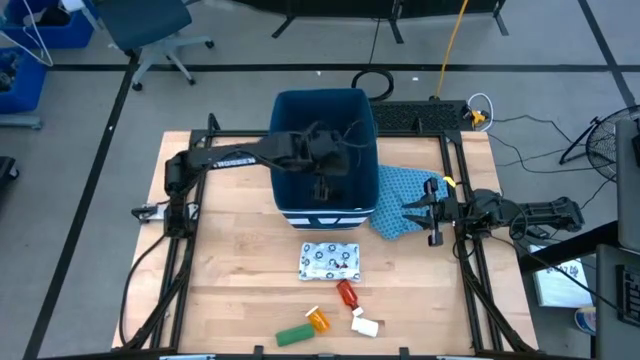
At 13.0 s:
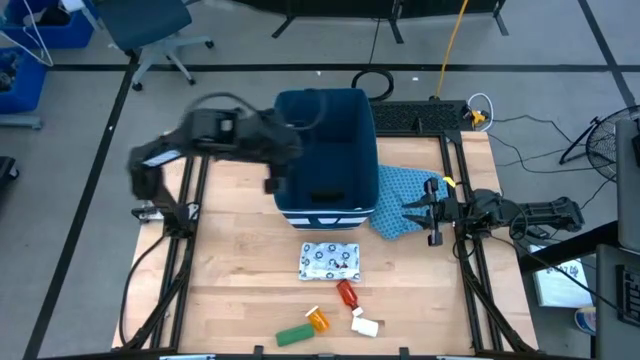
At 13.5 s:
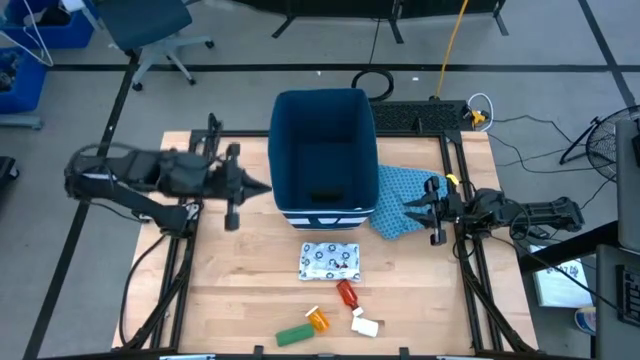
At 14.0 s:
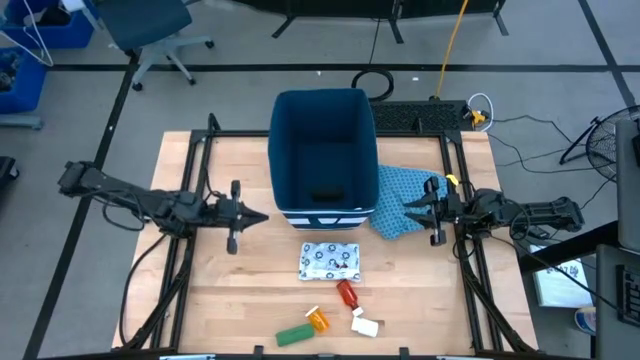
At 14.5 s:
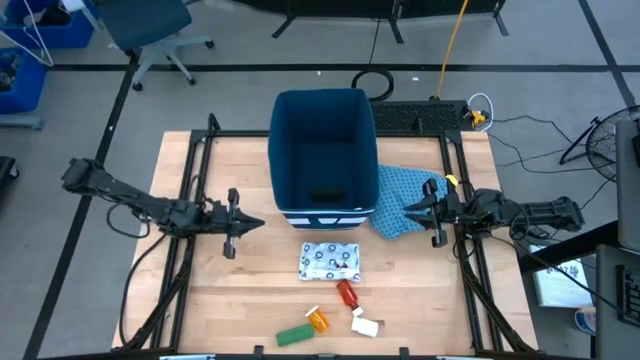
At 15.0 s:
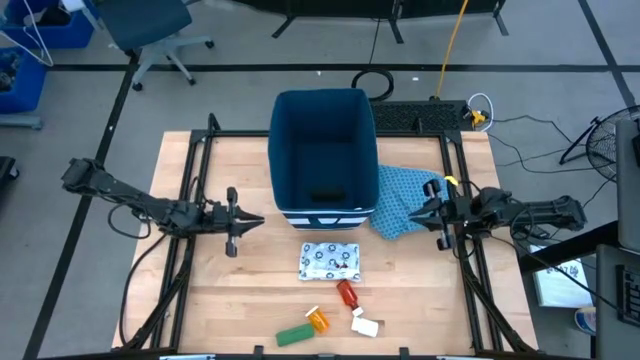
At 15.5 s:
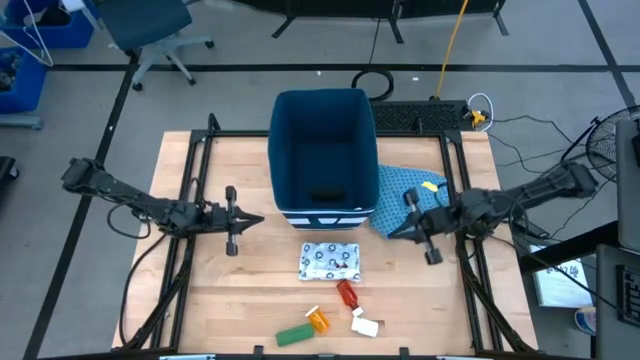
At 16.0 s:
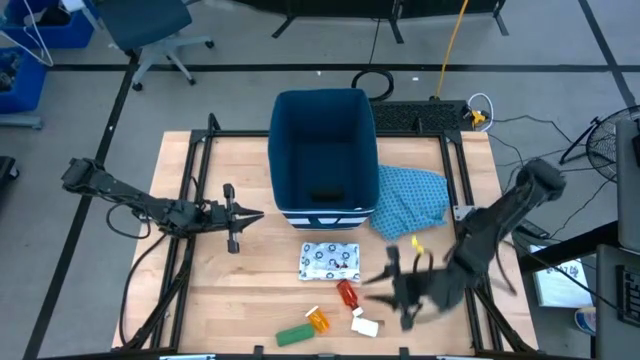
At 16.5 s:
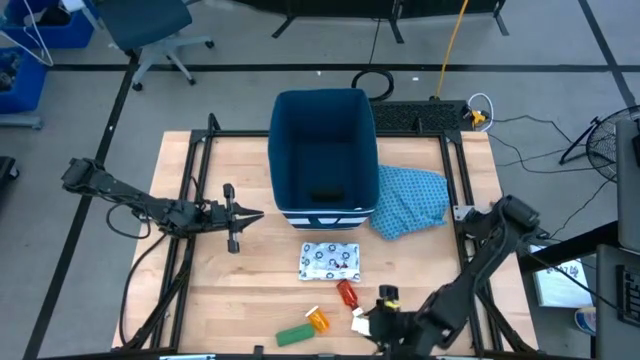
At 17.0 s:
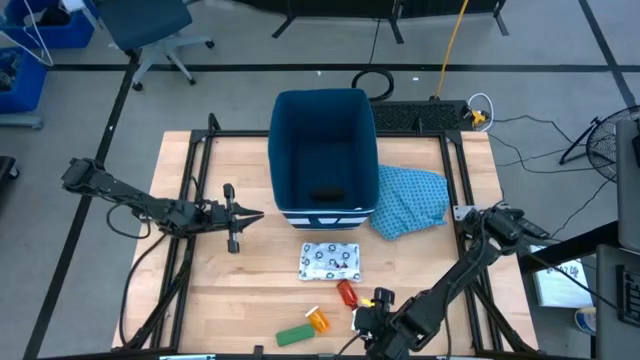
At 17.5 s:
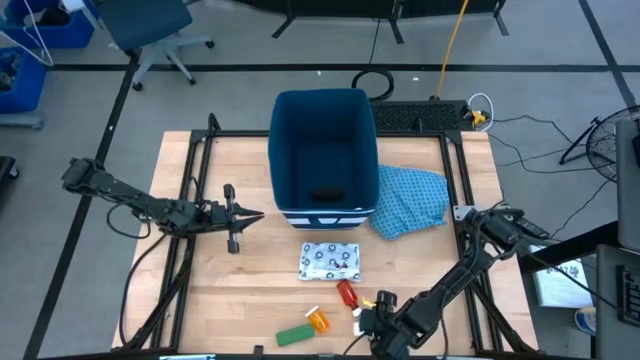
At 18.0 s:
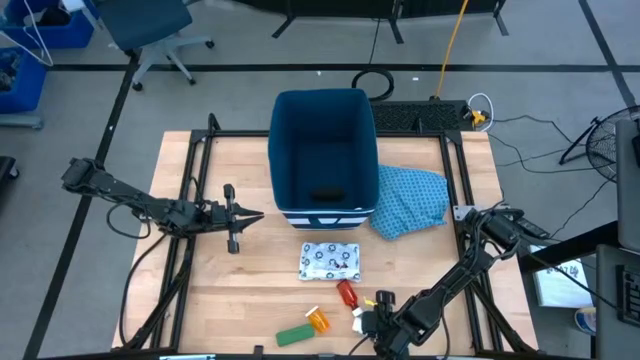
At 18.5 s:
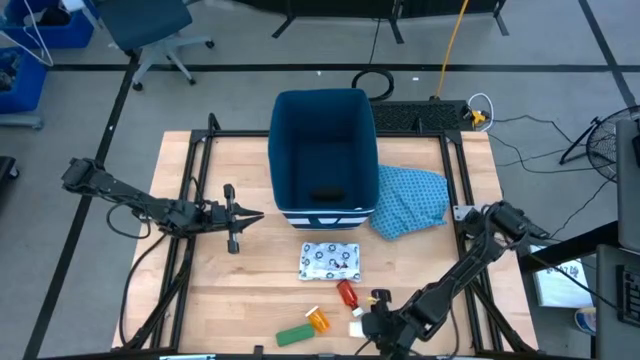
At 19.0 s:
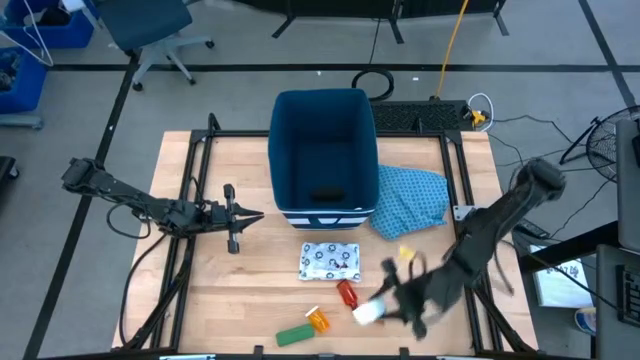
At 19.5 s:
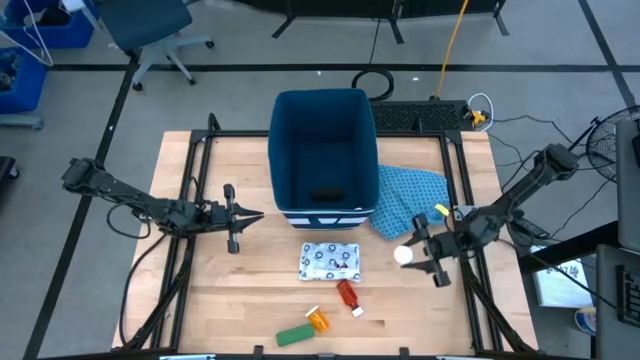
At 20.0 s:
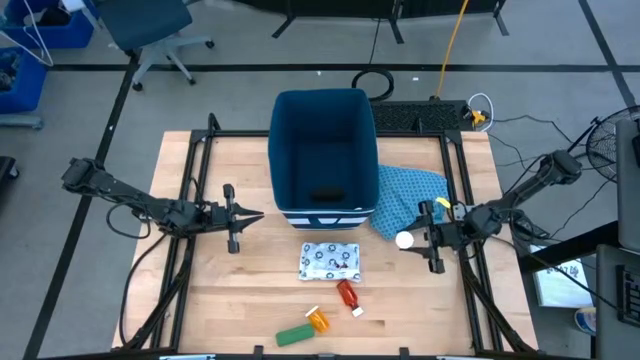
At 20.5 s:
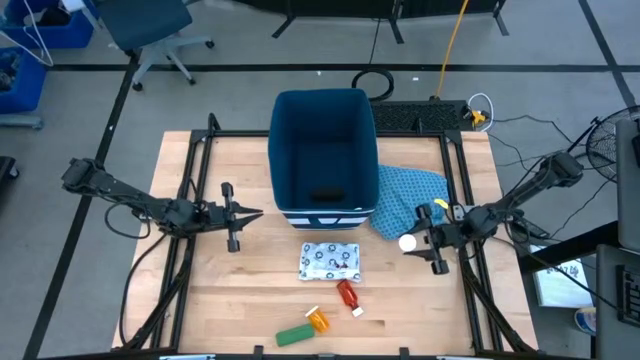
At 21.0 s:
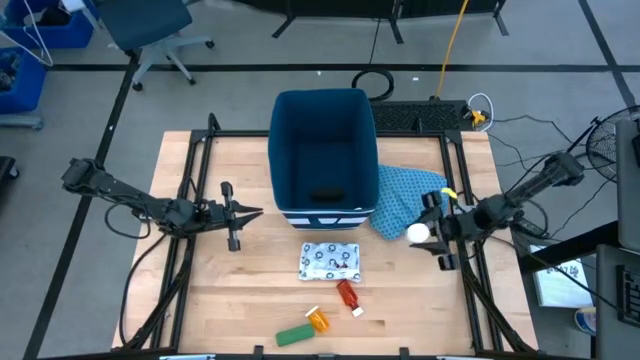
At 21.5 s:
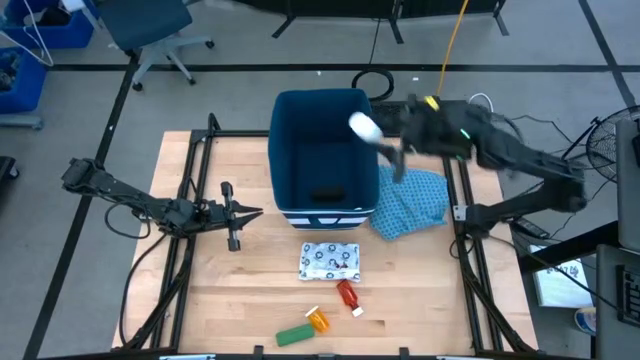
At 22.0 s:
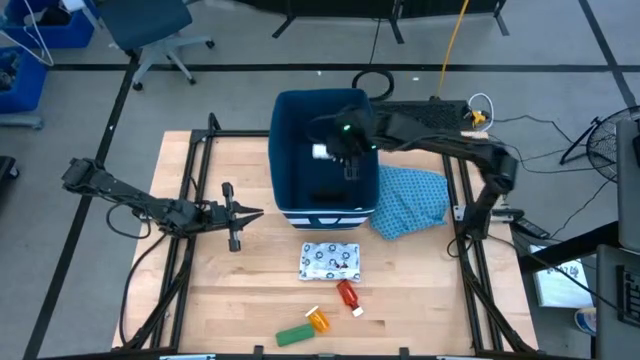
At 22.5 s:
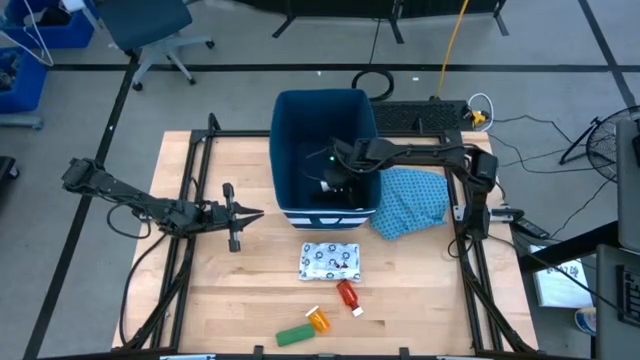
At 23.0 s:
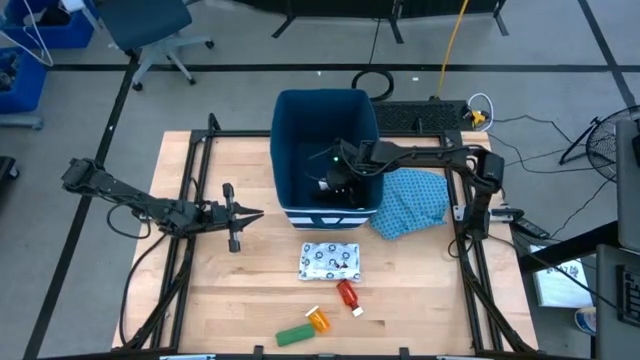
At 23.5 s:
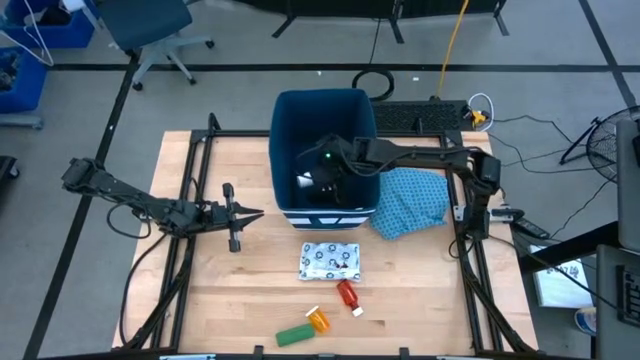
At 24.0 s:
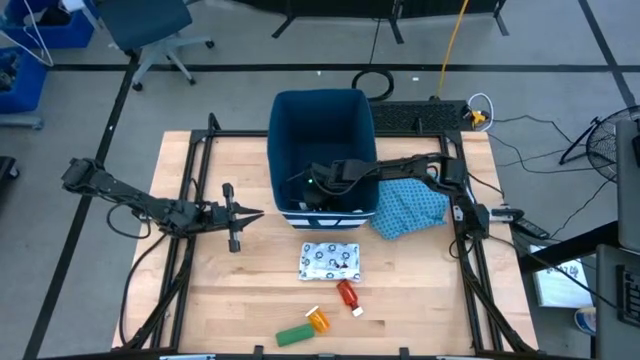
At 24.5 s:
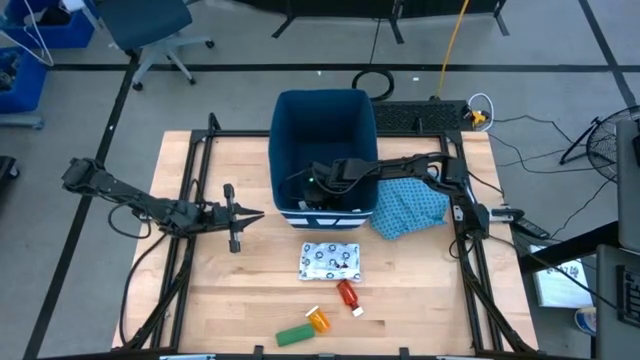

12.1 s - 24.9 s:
Task: Pick & place medical supplies in basket/bin
Put the white medicine bottle into the blue bin

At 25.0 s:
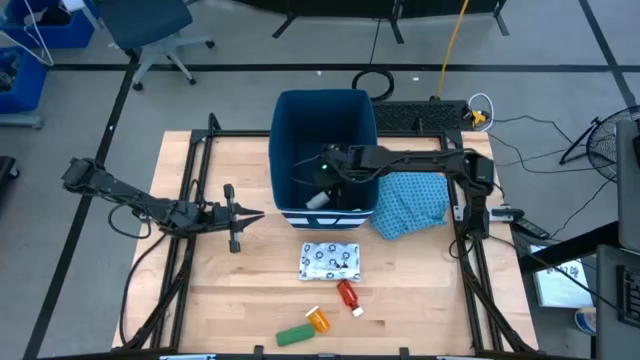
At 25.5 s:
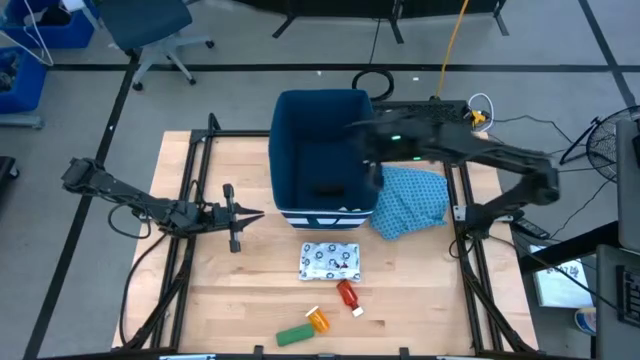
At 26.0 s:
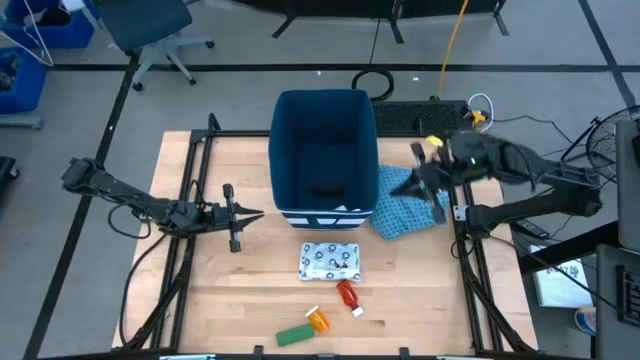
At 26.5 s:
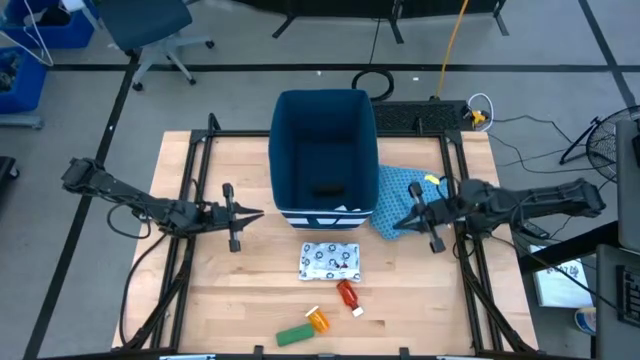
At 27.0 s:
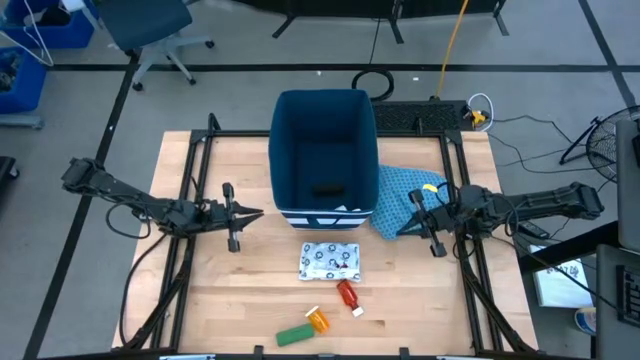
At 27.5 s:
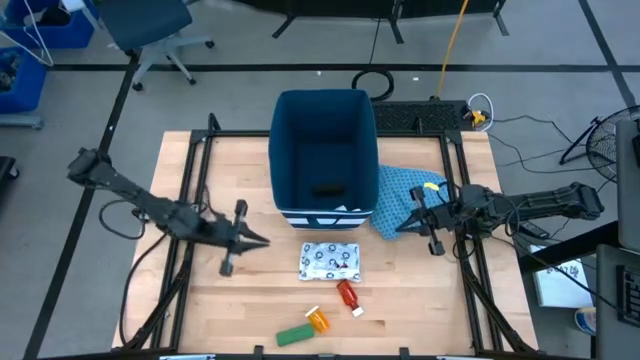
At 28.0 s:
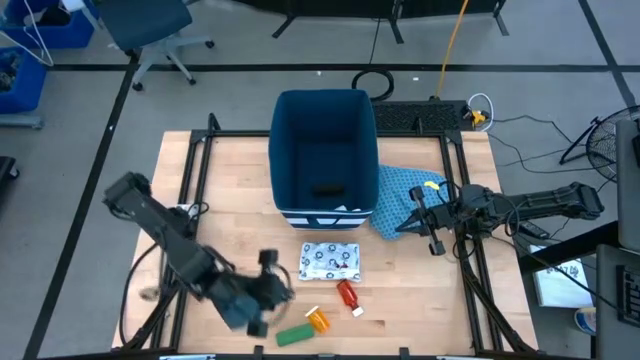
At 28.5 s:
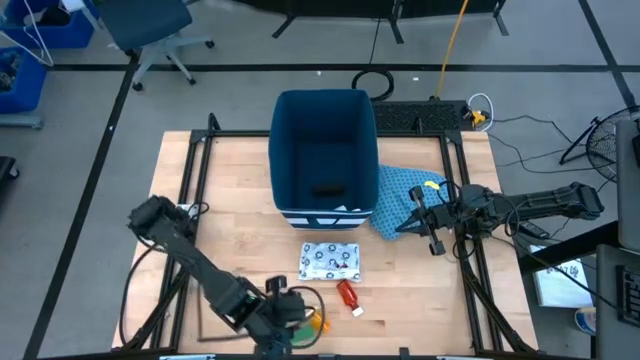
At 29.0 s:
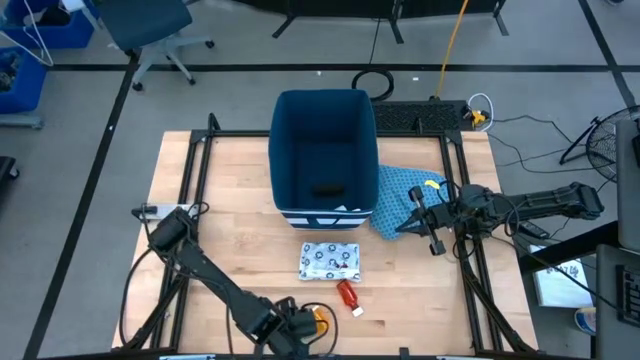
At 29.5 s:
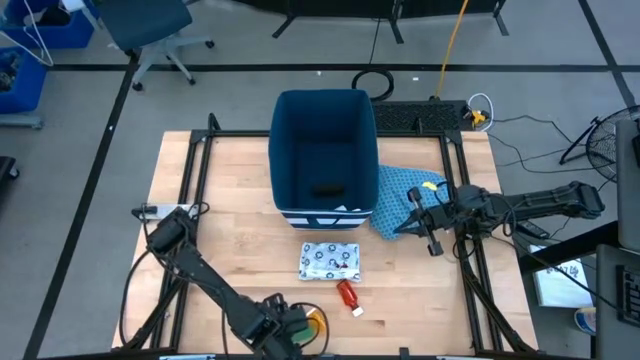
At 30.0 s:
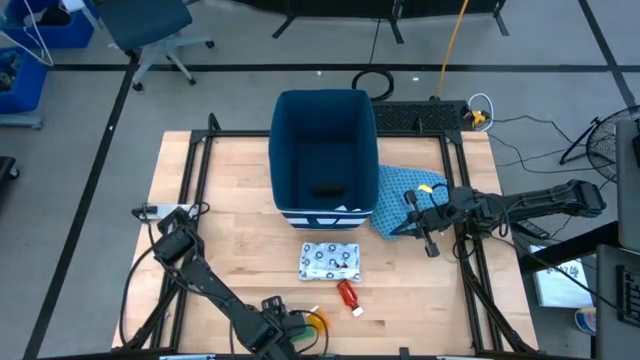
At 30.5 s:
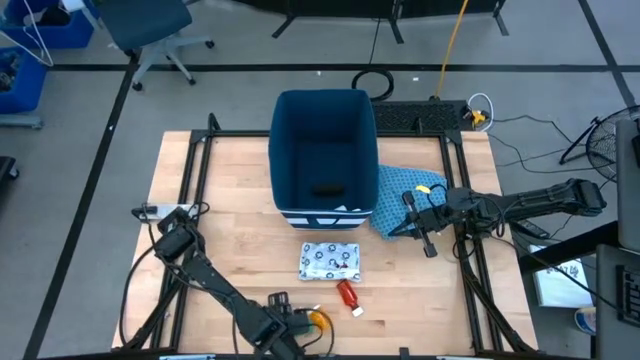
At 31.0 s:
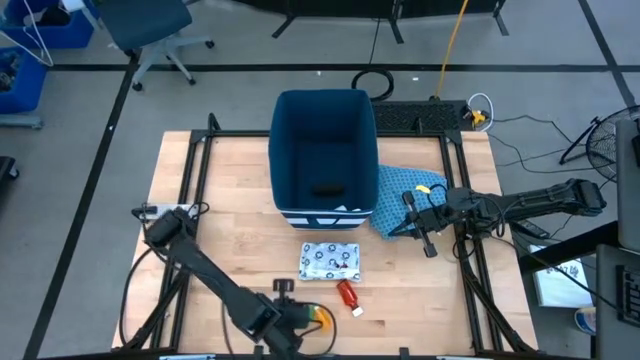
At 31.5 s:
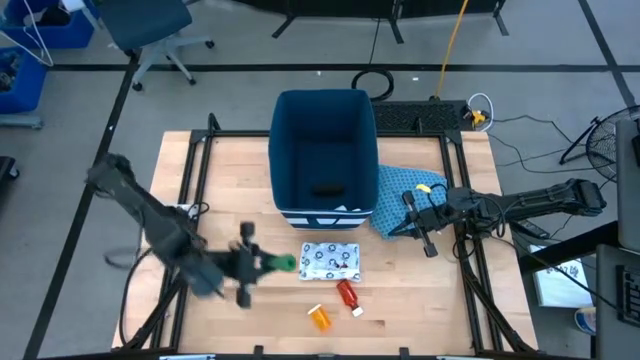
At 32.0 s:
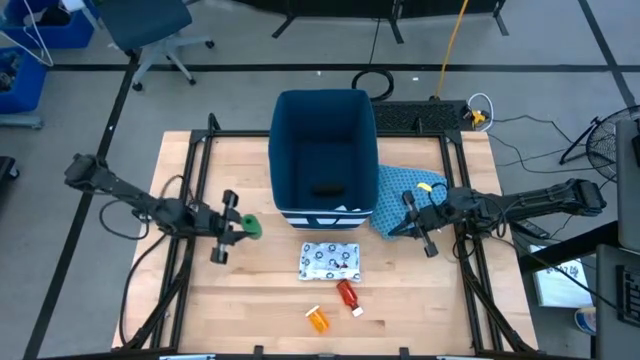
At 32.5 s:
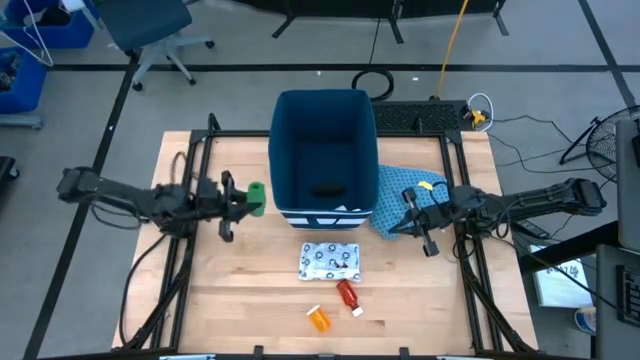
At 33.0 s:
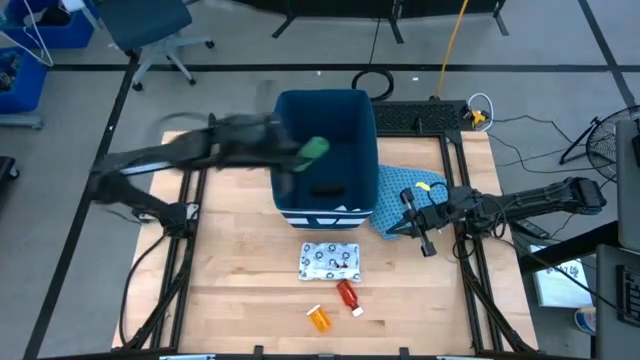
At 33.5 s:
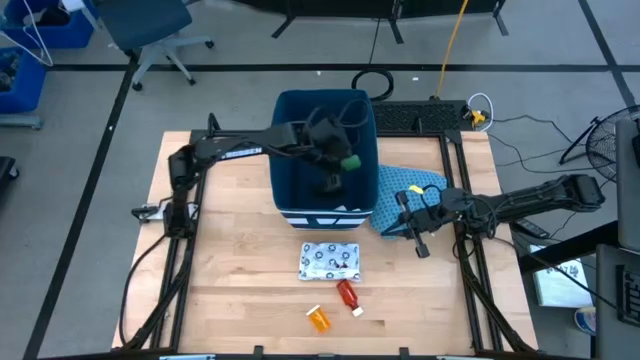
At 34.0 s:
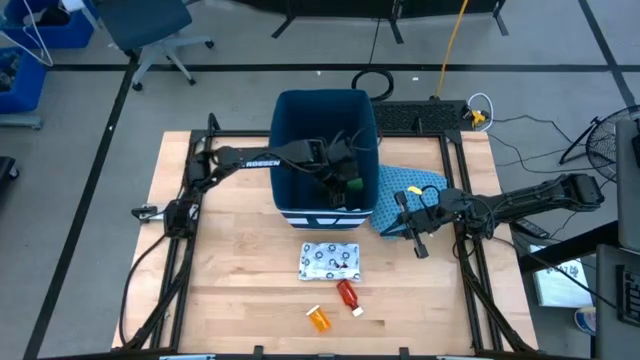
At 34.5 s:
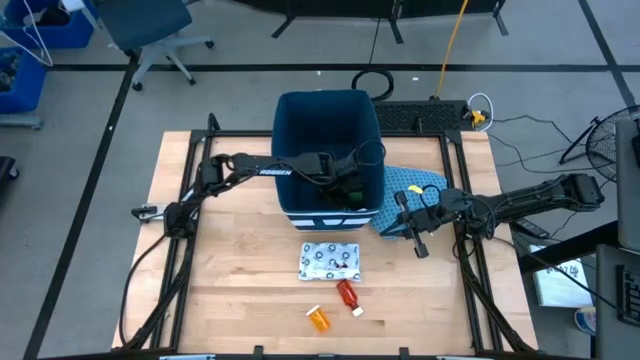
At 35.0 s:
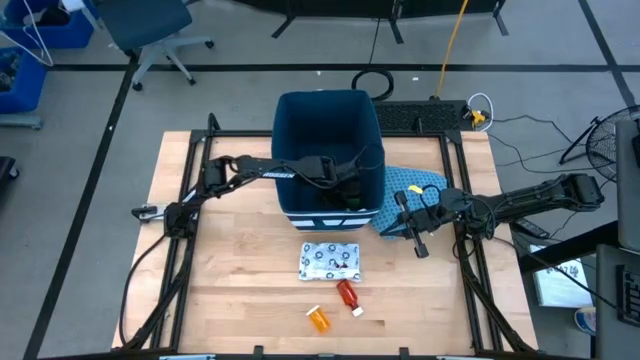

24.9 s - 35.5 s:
Put the green bandage into the blue bin
